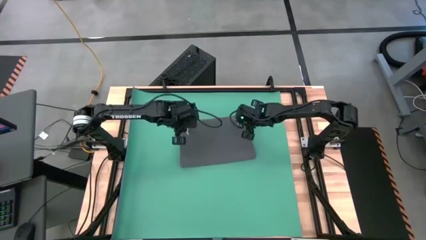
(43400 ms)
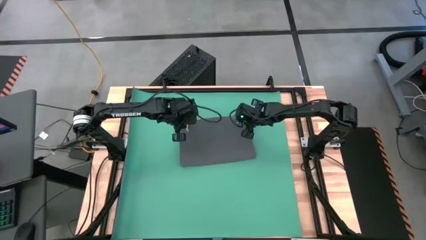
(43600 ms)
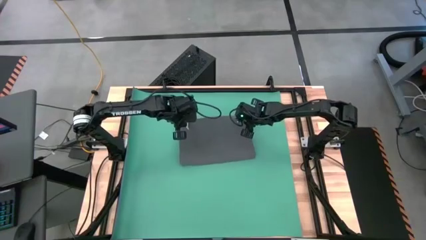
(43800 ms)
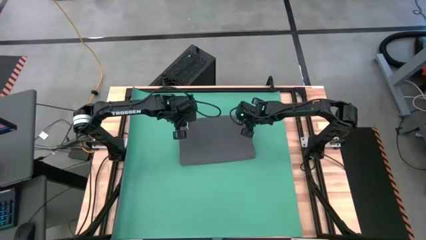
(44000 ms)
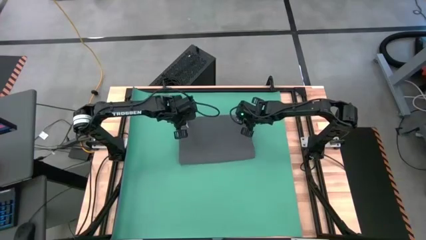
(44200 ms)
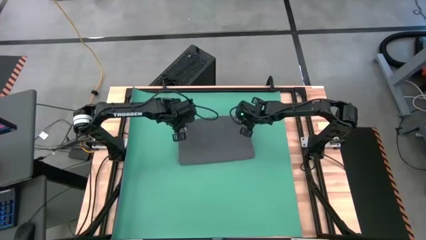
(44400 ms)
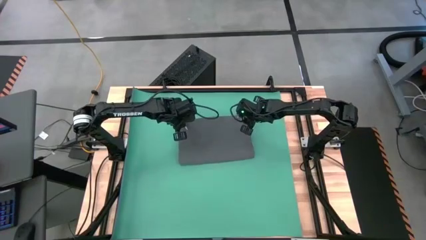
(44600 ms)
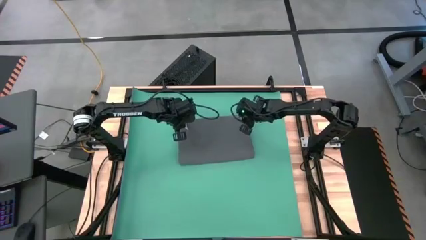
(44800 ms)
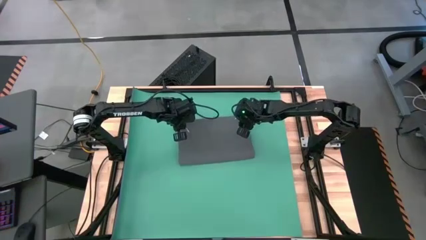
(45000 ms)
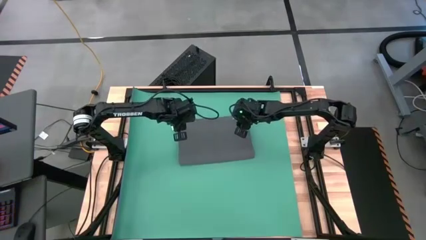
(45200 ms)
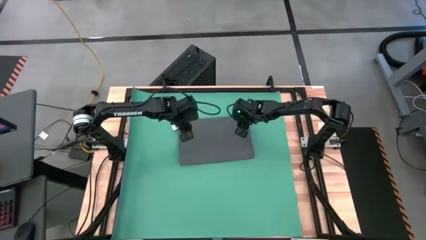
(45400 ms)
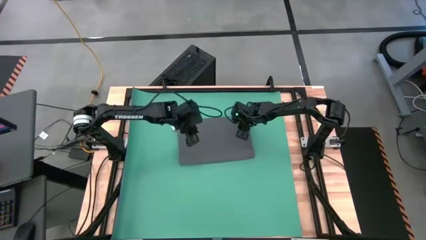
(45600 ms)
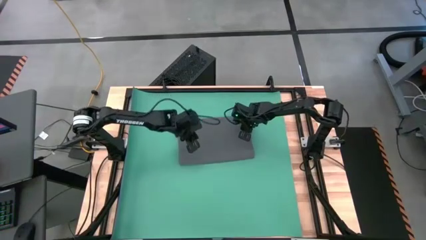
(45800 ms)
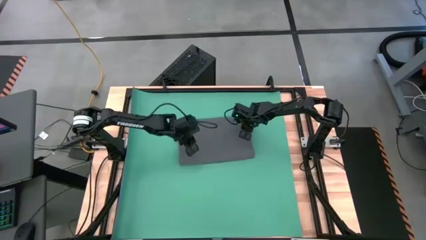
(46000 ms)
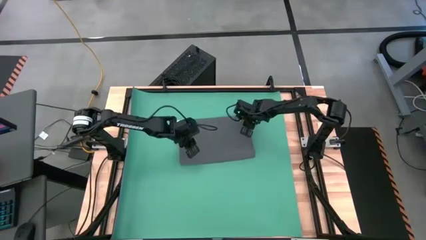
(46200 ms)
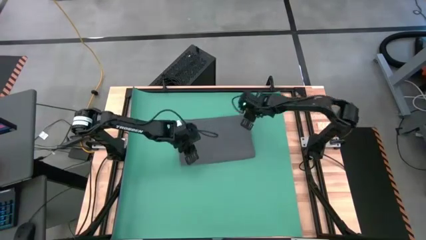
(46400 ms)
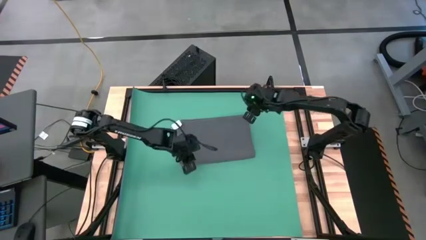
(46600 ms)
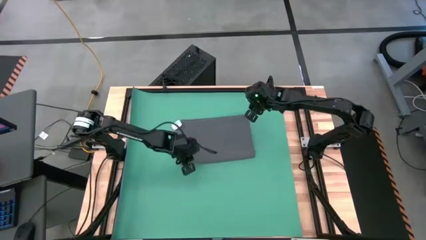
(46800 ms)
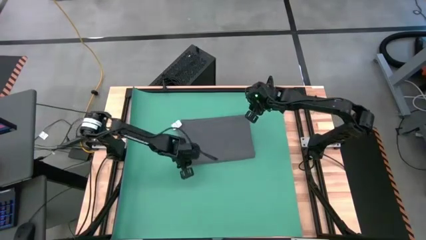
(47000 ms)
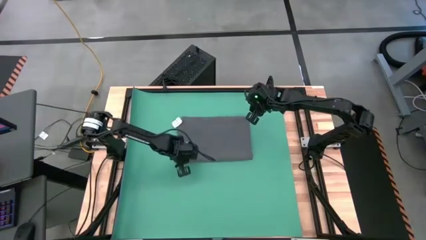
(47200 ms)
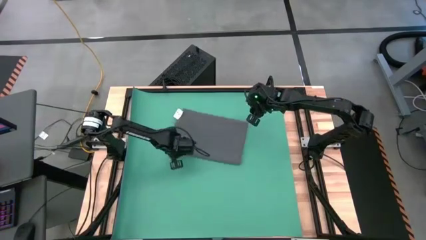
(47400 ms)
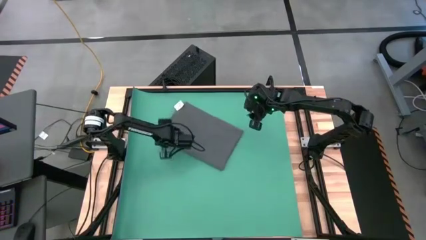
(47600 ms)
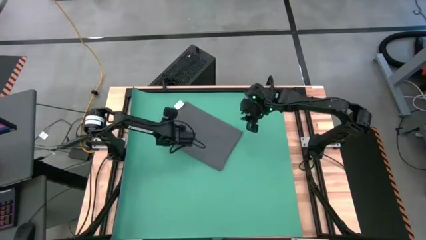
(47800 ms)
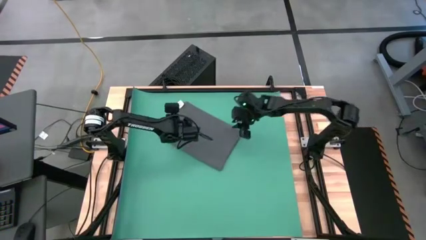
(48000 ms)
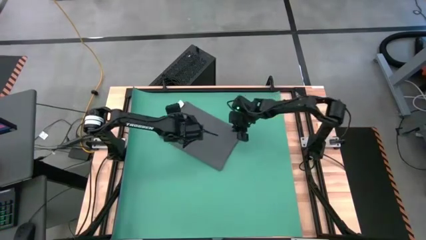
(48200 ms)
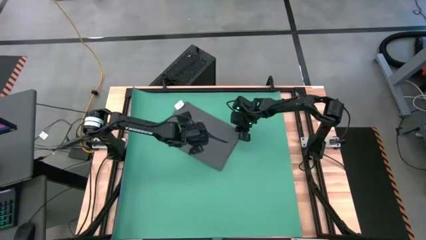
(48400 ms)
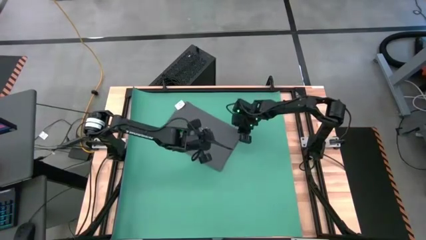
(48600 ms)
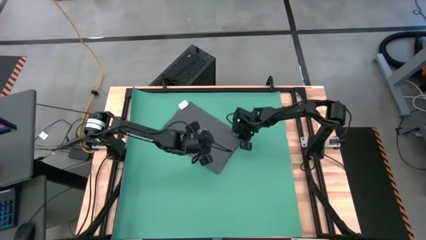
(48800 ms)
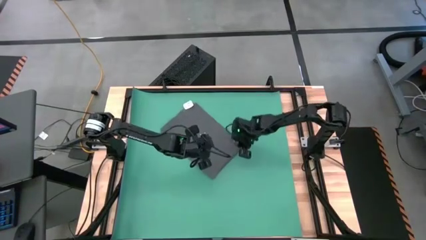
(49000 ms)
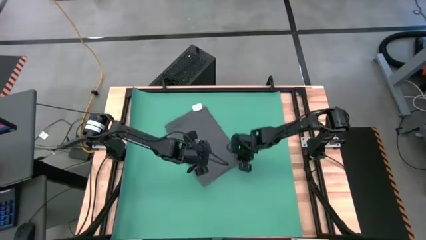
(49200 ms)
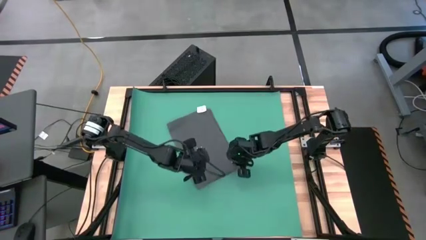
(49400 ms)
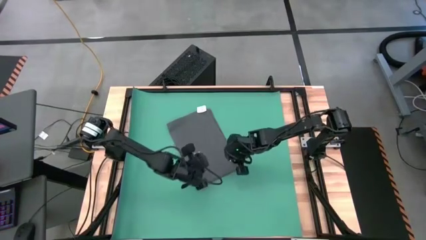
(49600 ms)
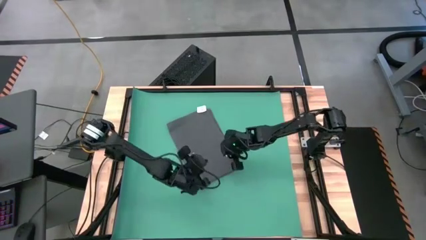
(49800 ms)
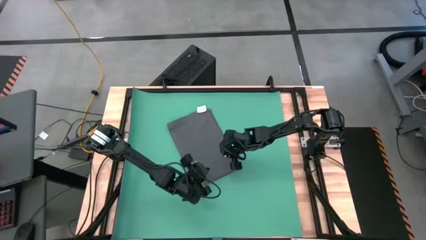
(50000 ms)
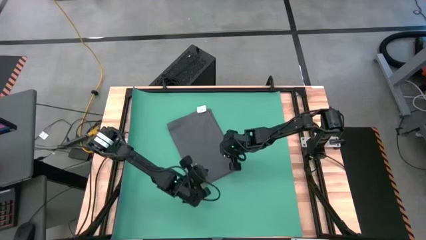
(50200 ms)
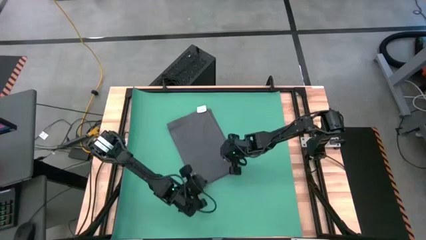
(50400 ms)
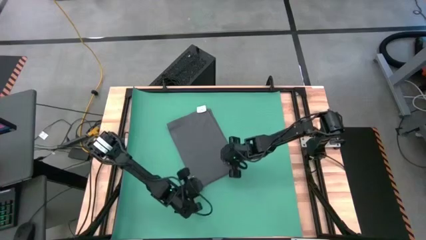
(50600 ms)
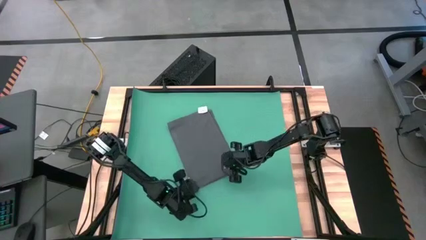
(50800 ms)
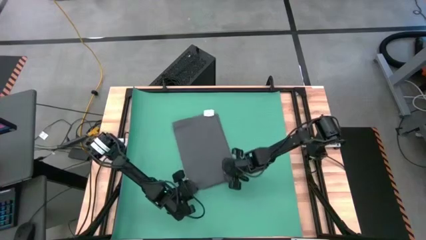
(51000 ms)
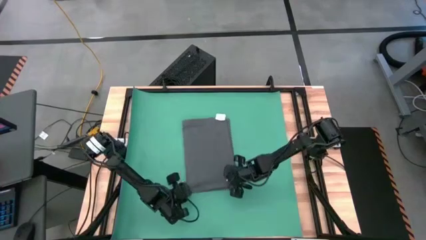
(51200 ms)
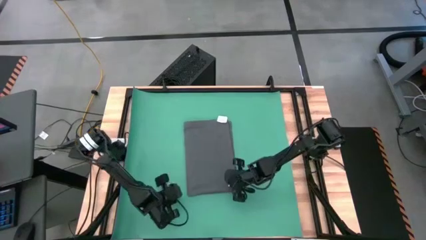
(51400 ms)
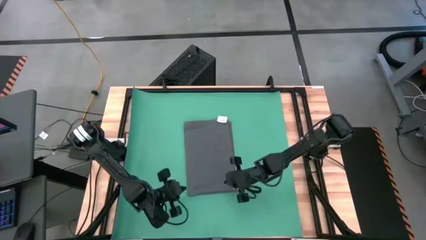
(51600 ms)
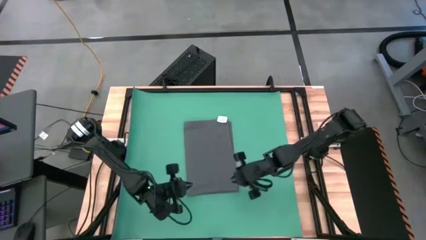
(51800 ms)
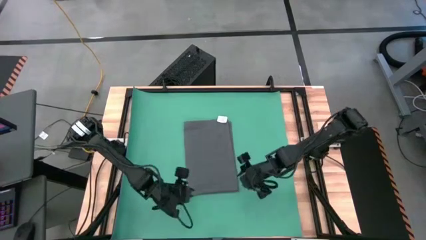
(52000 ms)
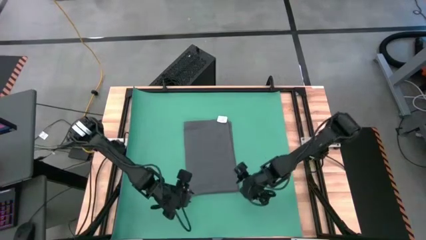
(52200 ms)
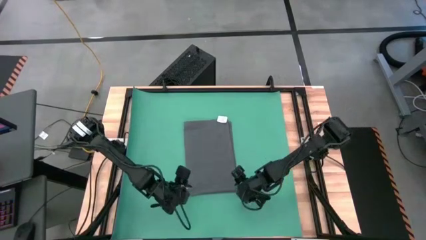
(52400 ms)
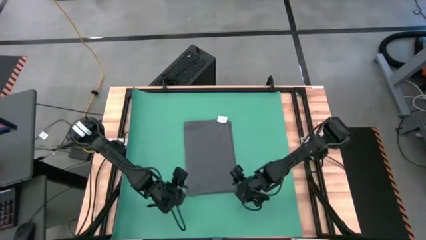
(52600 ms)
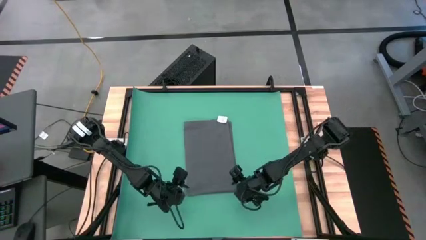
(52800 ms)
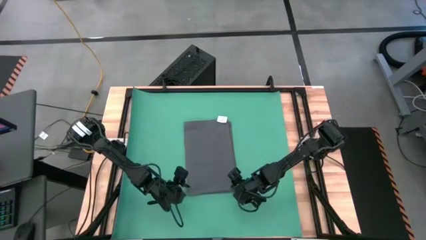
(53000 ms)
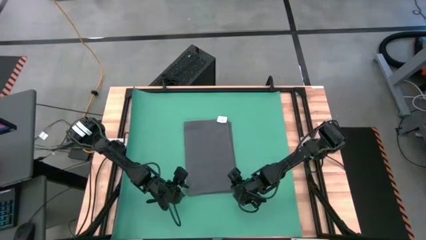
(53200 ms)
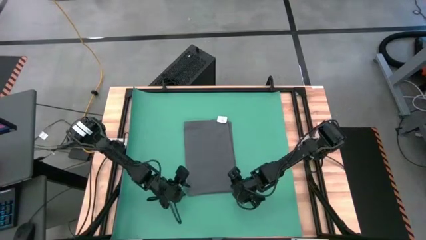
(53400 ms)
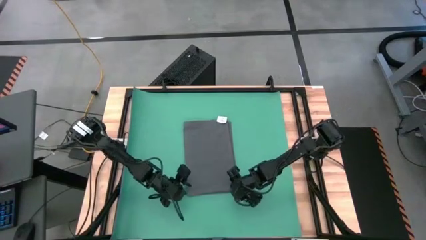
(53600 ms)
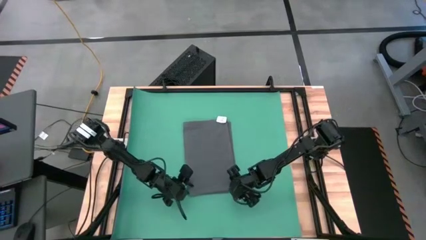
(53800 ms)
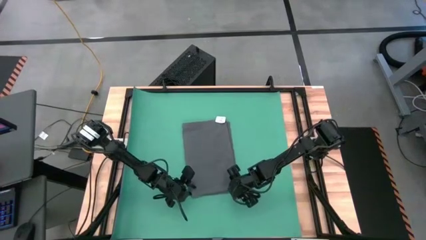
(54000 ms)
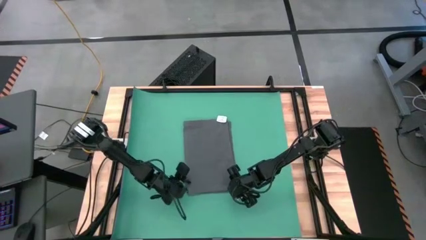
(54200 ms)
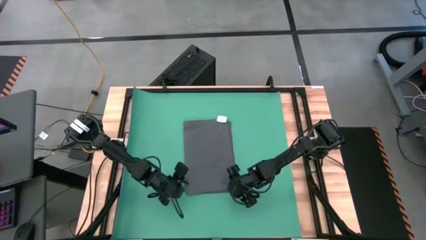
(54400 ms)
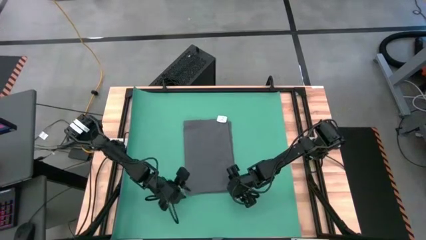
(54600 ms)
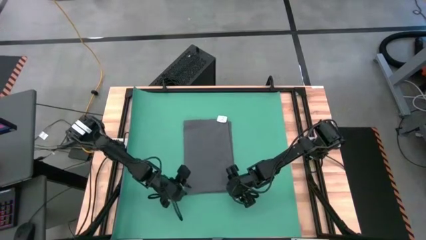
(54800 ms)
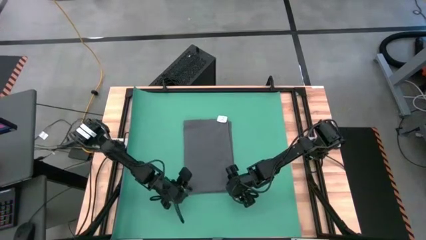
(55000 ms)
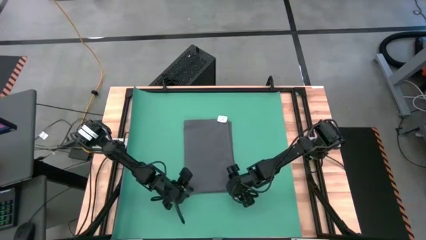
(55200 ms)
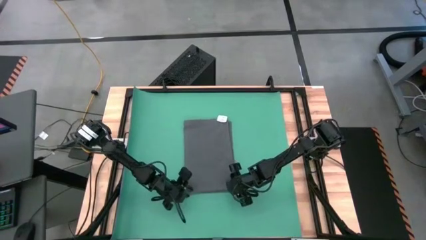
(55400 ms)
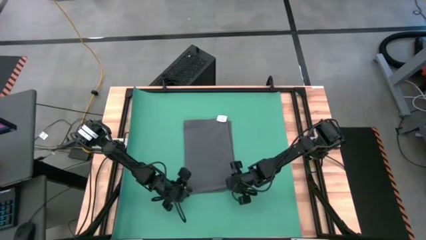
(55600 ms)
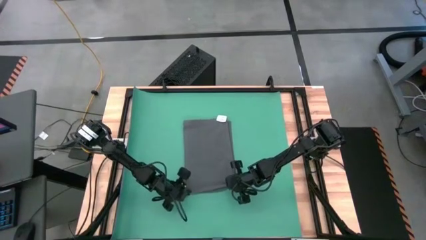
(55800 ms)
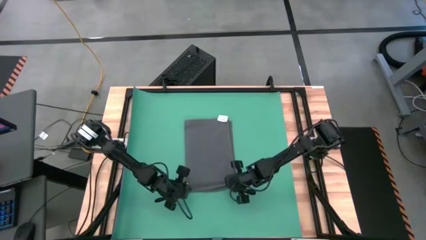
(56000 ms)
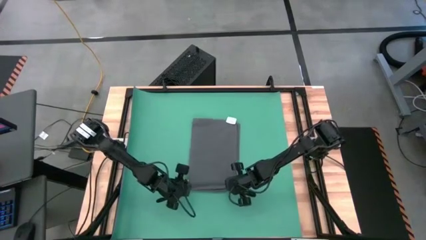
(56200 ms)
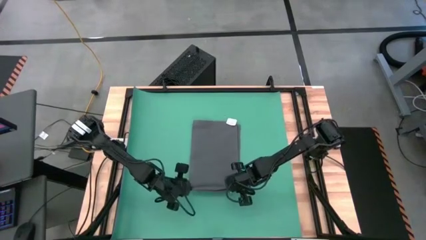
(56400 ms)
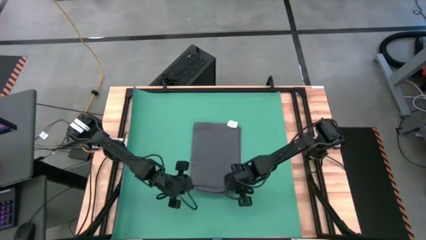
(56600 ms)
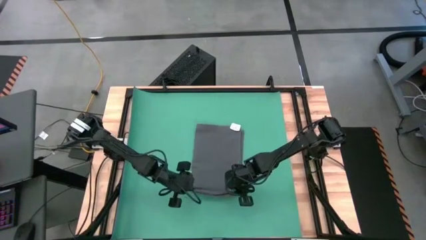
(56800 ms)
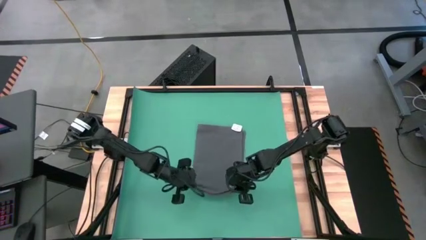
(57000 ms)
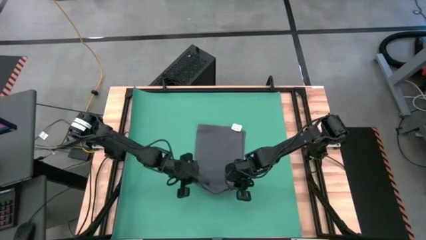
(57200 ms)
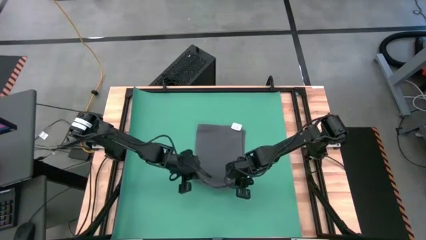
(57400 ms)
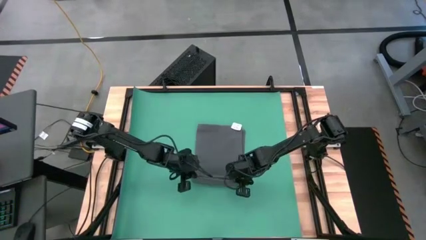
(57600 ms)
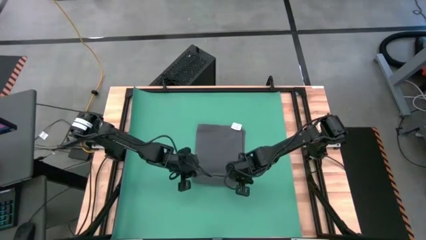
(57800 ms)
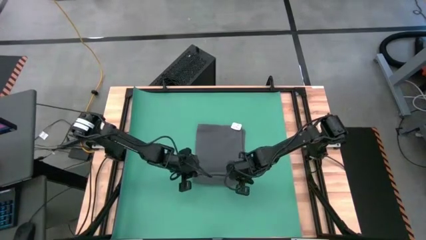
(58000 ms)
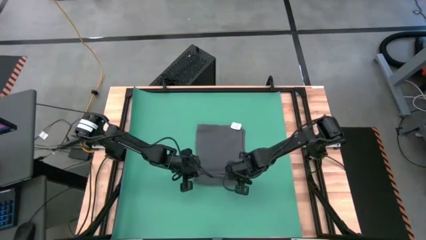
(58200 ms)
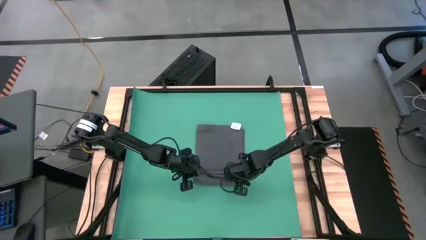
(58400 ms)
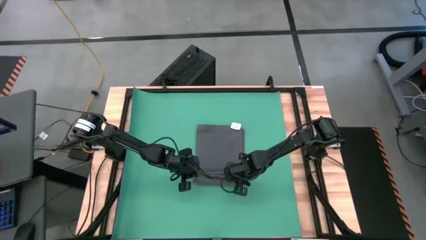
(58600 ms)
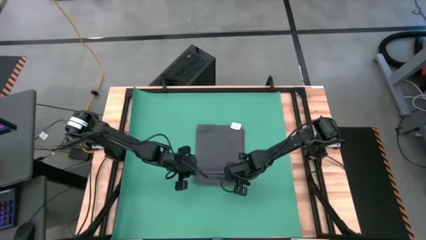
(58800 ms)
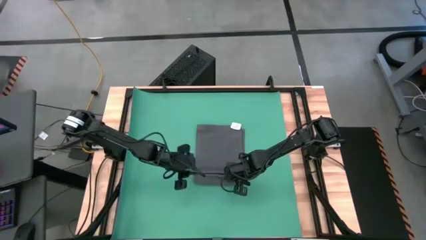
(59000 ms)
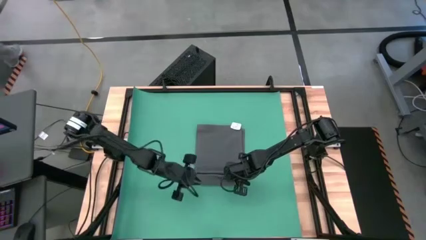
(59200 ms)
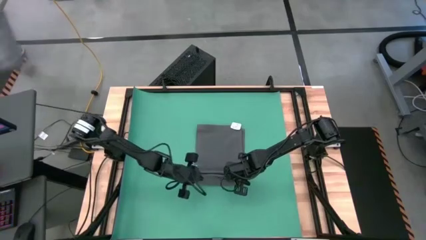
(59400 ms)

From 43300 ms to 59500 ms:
Task: Roll towel
Roll the gray towel

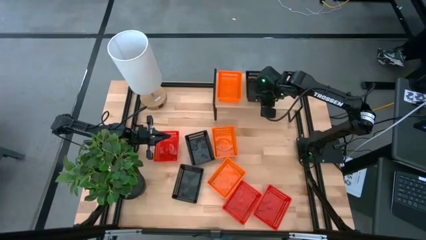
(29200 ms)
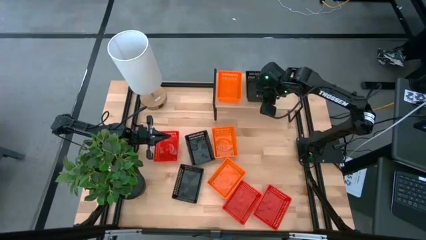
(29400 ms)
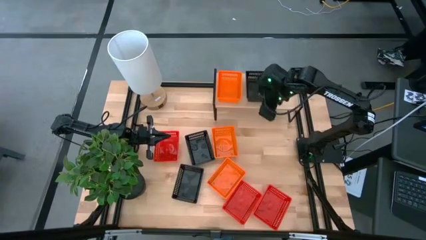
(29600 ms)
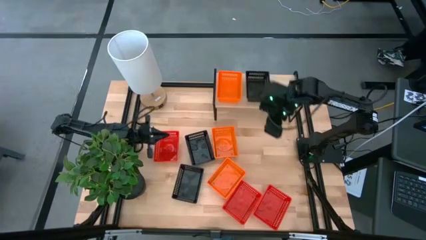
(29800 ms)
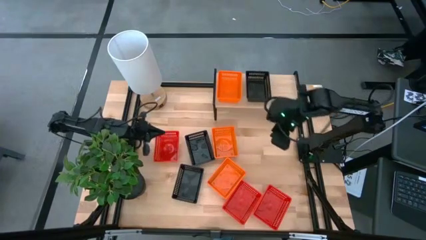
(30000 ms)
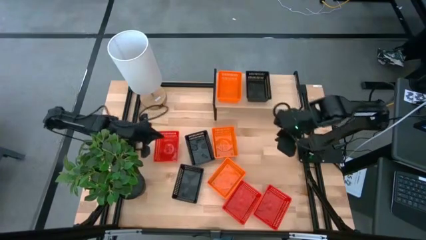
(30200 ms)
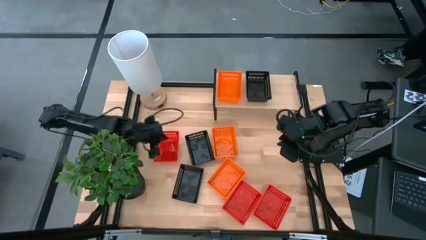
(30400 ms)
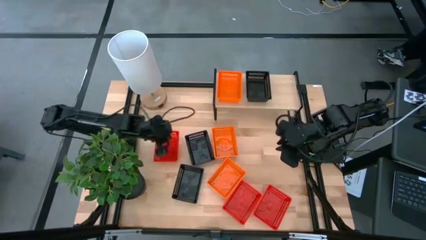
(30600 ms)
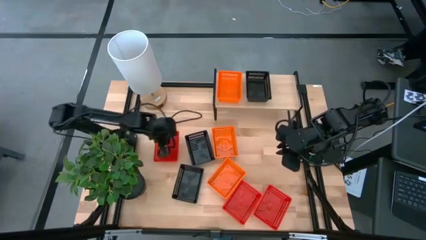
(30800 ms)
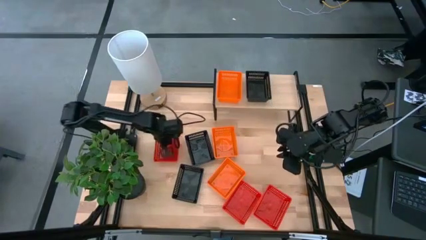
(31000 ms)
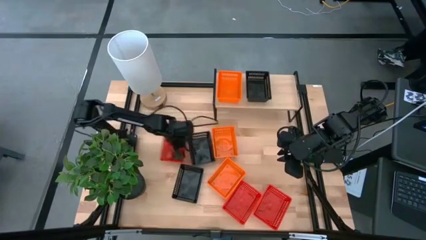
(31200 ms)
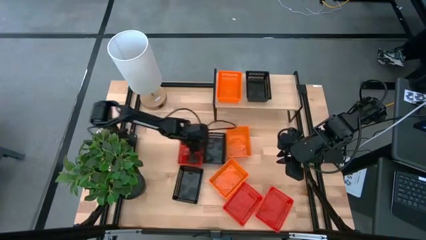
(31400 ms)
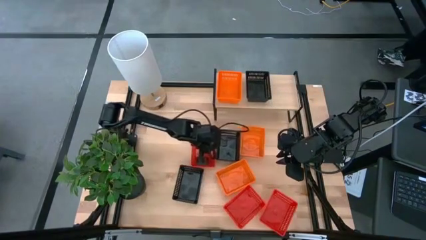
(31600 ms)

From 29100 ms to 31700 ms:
Task: Stack baskets on shelf by color
Adjust the top red bin on the table
